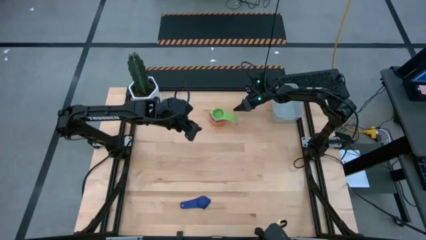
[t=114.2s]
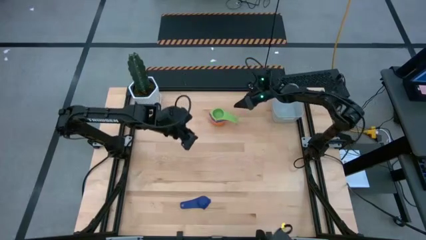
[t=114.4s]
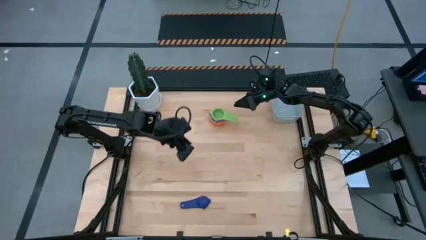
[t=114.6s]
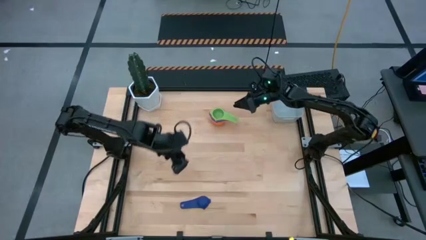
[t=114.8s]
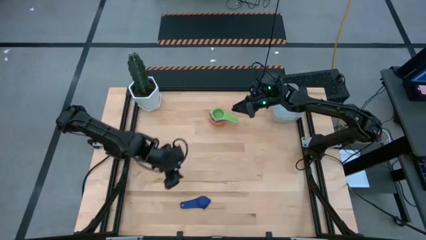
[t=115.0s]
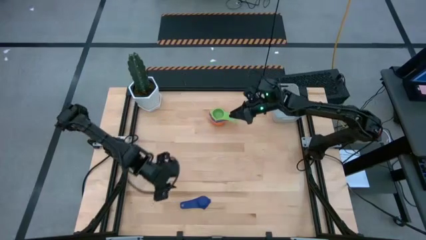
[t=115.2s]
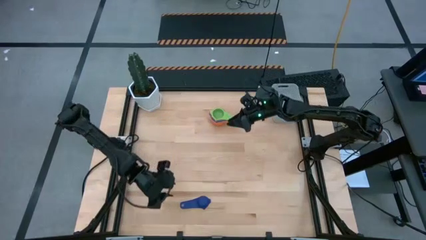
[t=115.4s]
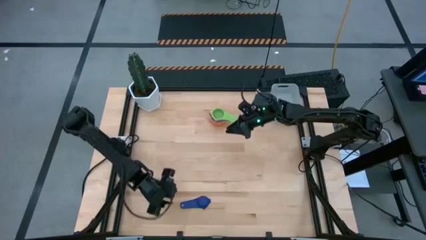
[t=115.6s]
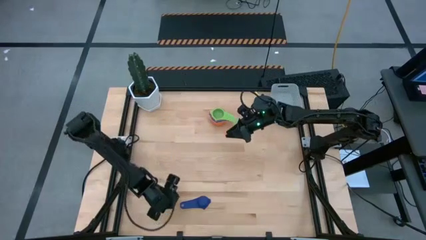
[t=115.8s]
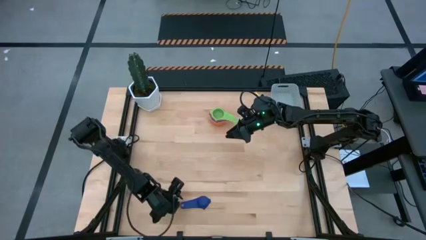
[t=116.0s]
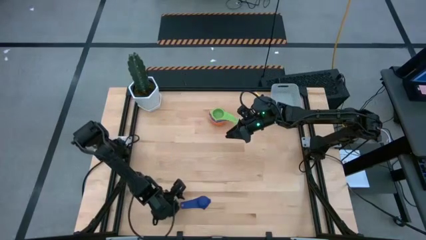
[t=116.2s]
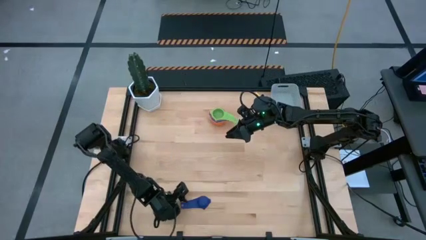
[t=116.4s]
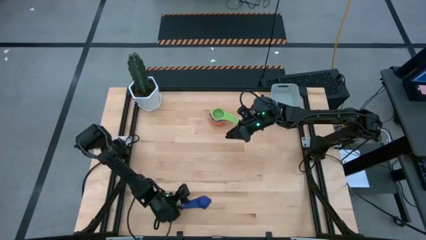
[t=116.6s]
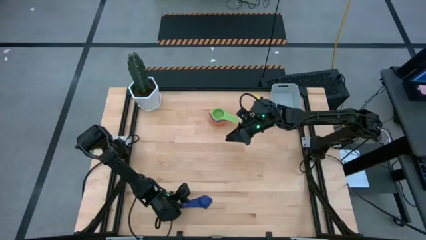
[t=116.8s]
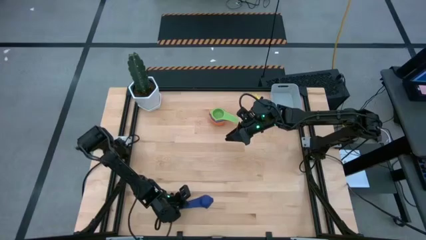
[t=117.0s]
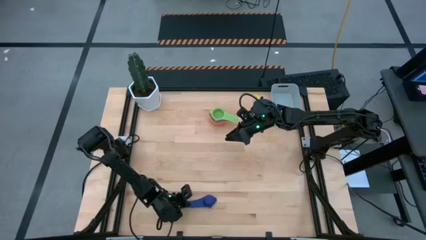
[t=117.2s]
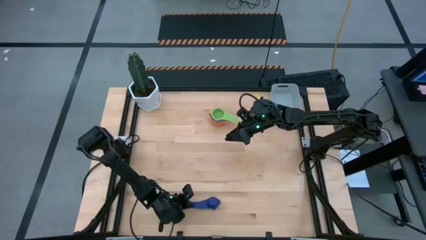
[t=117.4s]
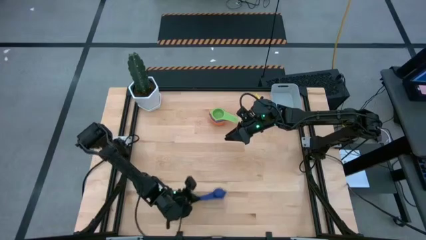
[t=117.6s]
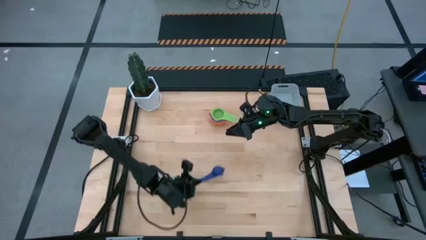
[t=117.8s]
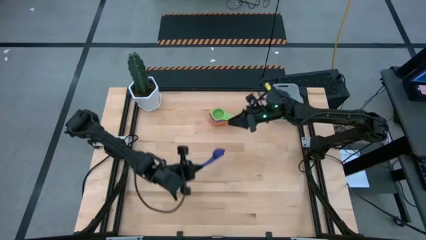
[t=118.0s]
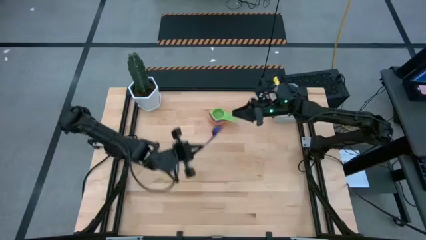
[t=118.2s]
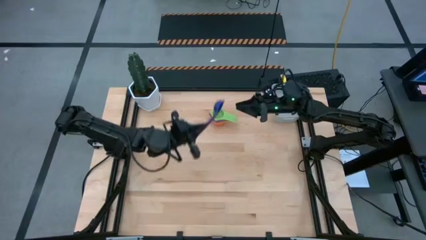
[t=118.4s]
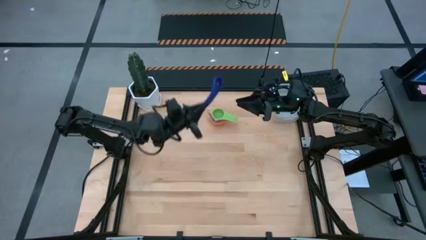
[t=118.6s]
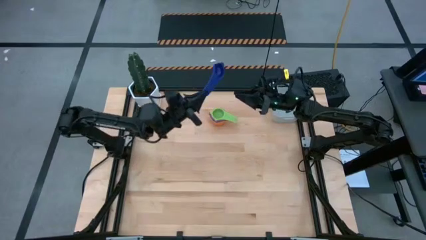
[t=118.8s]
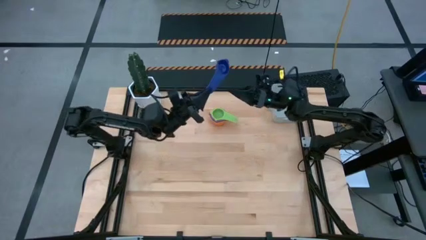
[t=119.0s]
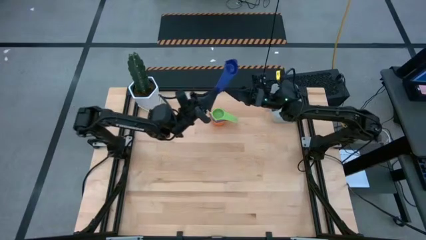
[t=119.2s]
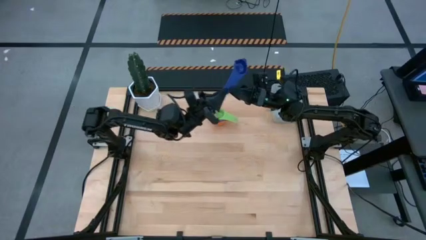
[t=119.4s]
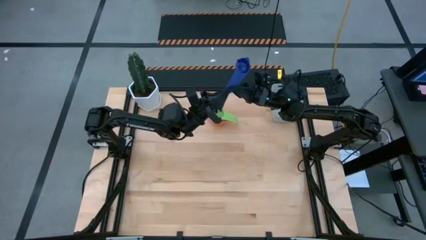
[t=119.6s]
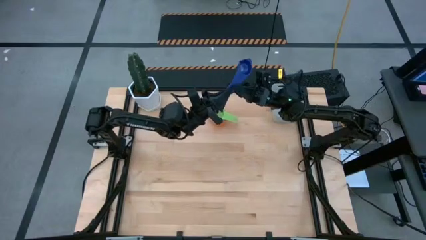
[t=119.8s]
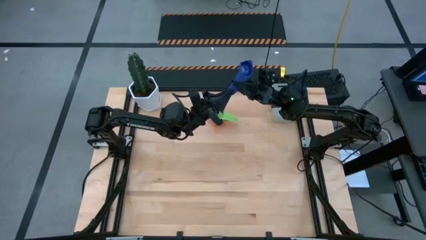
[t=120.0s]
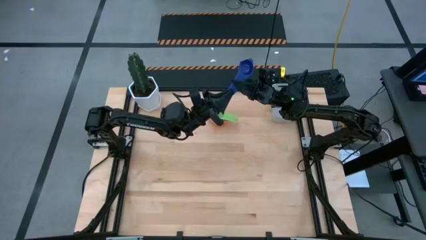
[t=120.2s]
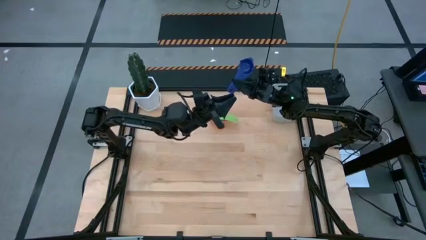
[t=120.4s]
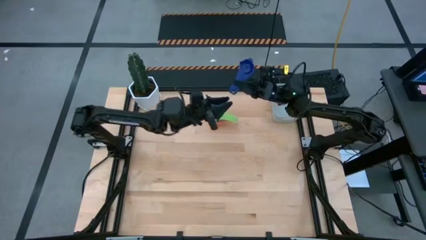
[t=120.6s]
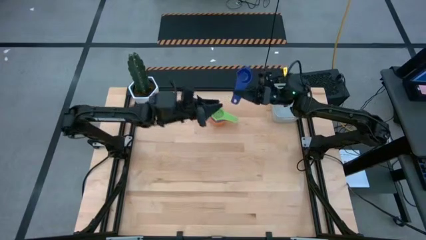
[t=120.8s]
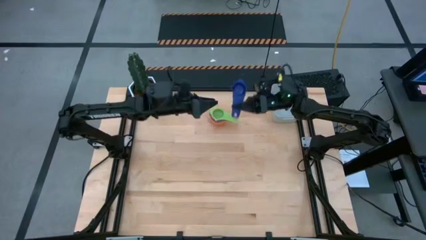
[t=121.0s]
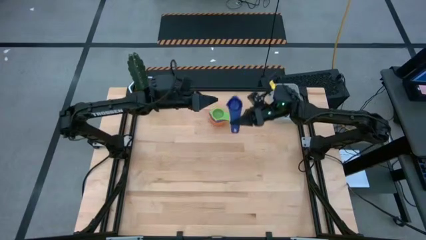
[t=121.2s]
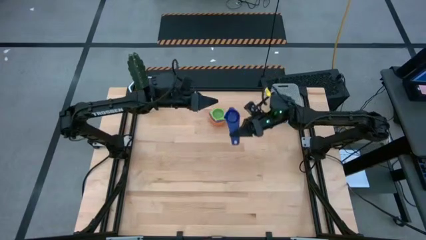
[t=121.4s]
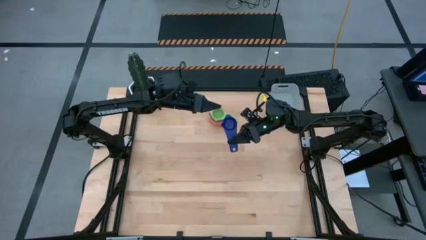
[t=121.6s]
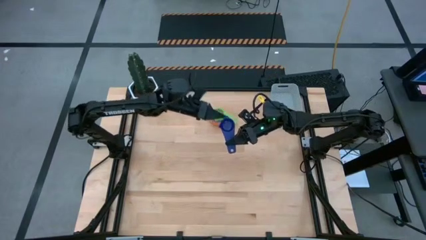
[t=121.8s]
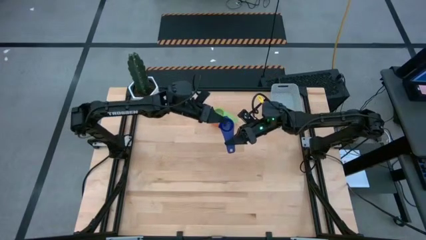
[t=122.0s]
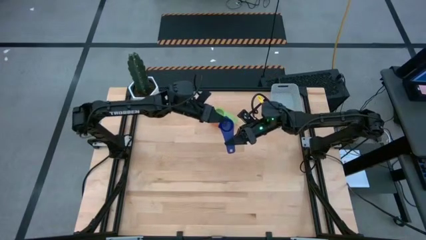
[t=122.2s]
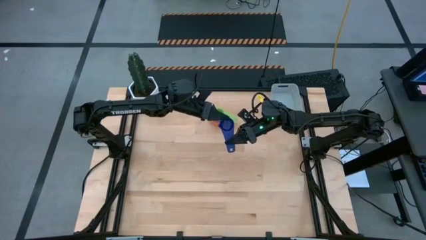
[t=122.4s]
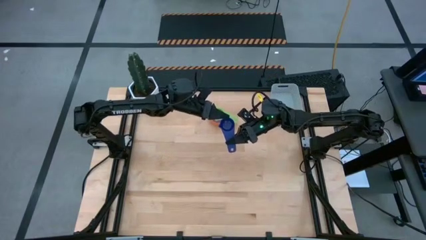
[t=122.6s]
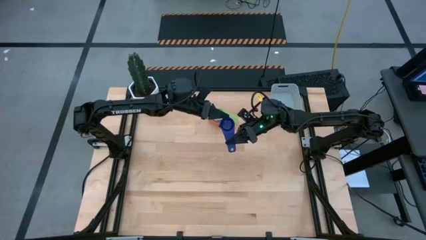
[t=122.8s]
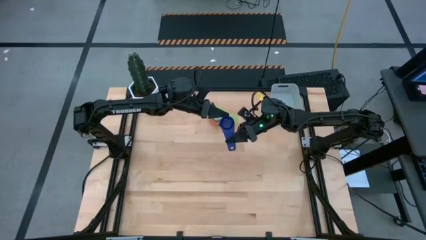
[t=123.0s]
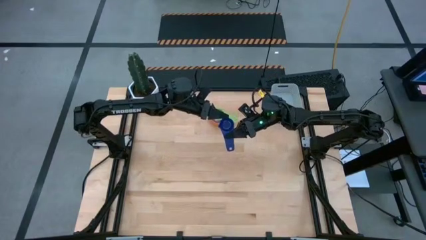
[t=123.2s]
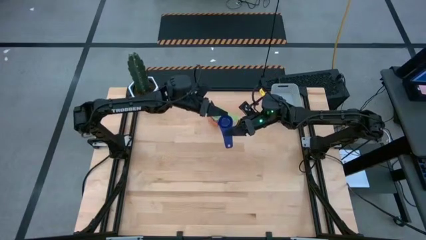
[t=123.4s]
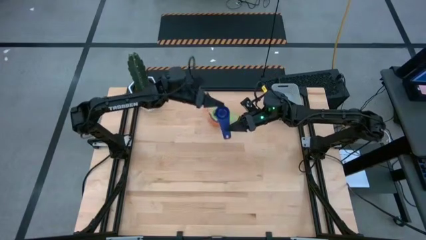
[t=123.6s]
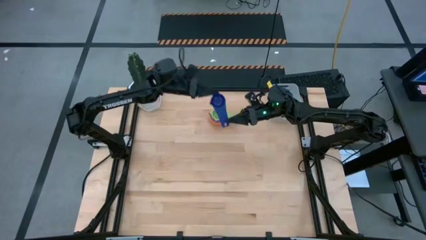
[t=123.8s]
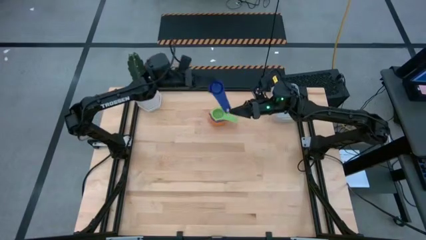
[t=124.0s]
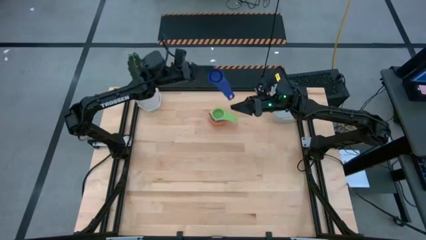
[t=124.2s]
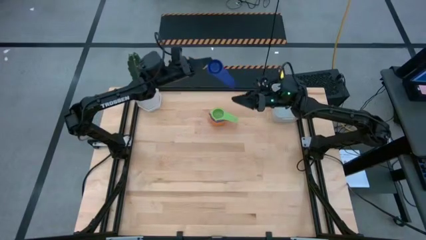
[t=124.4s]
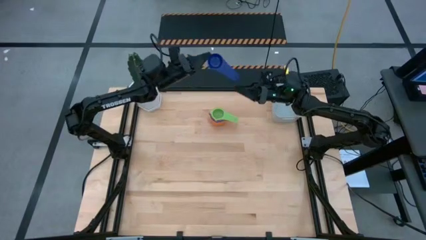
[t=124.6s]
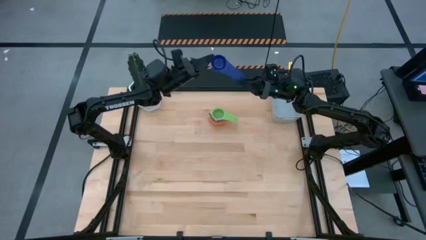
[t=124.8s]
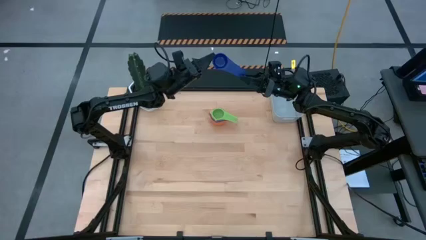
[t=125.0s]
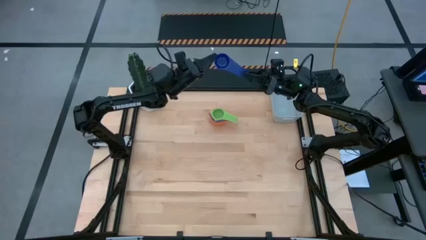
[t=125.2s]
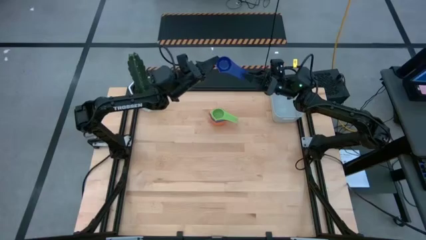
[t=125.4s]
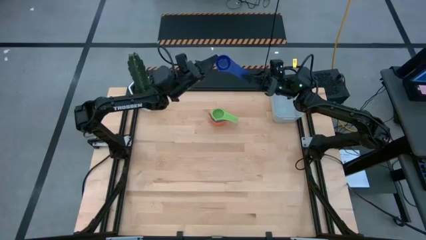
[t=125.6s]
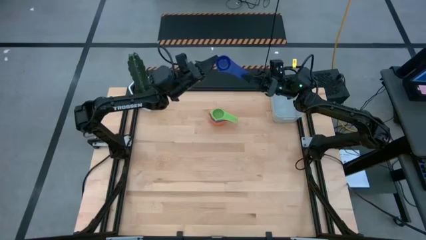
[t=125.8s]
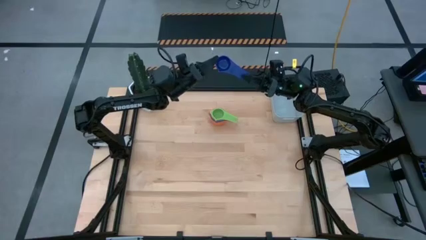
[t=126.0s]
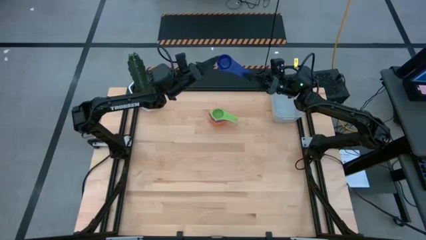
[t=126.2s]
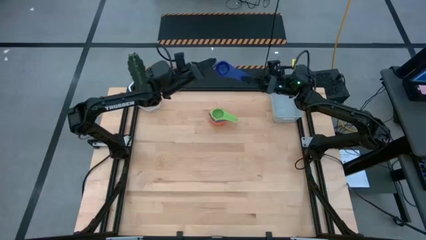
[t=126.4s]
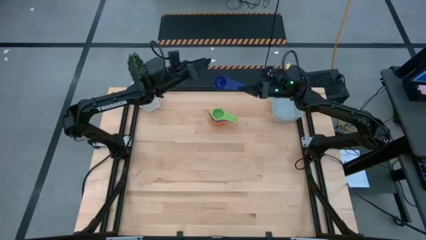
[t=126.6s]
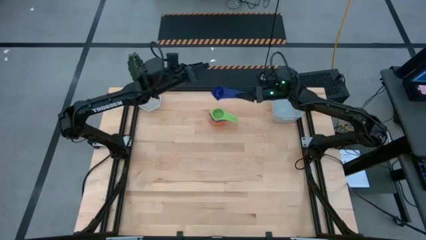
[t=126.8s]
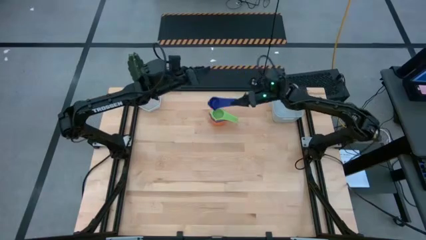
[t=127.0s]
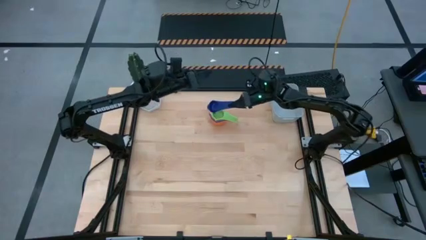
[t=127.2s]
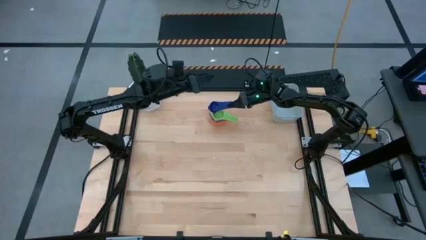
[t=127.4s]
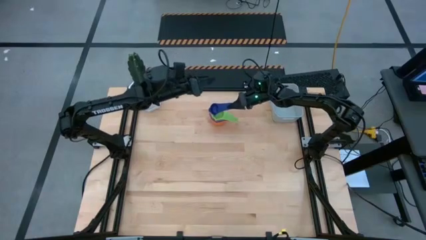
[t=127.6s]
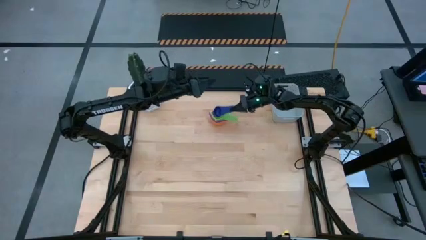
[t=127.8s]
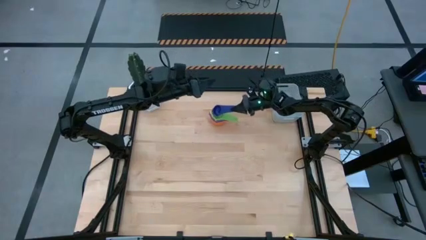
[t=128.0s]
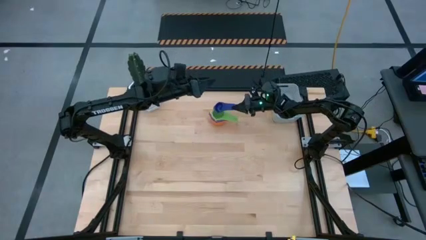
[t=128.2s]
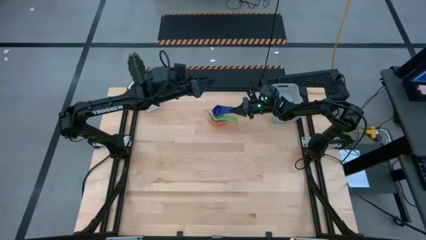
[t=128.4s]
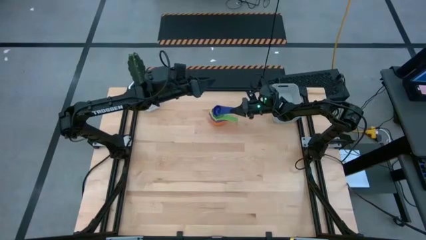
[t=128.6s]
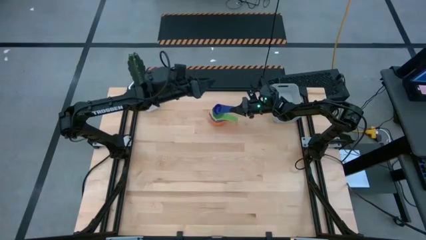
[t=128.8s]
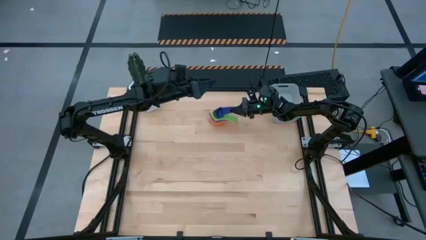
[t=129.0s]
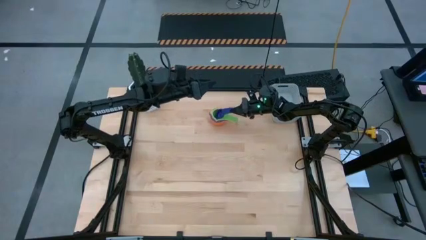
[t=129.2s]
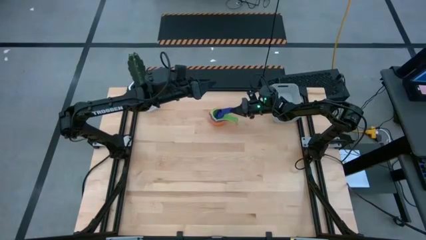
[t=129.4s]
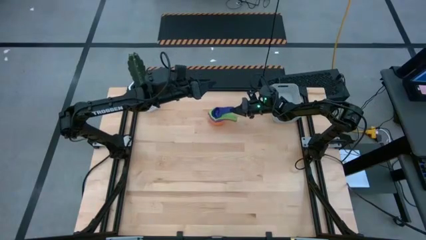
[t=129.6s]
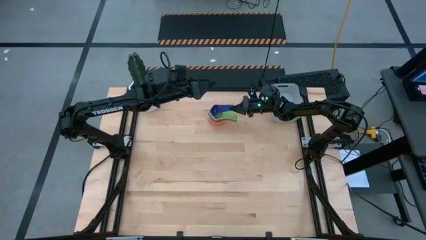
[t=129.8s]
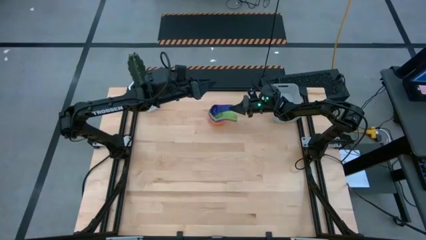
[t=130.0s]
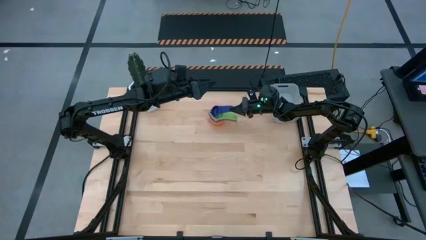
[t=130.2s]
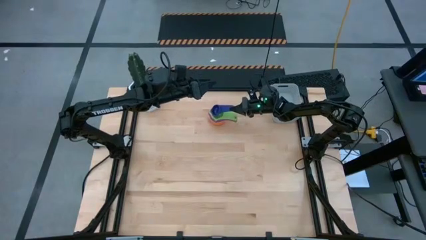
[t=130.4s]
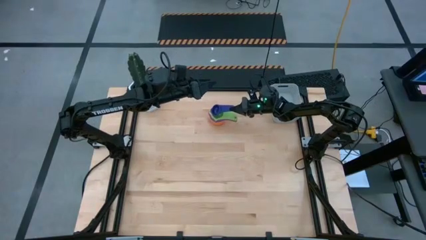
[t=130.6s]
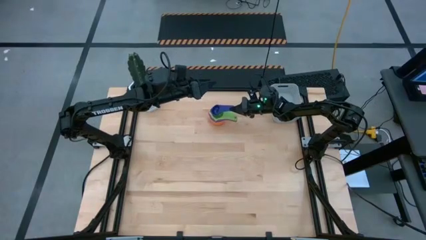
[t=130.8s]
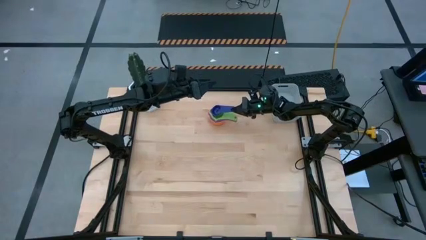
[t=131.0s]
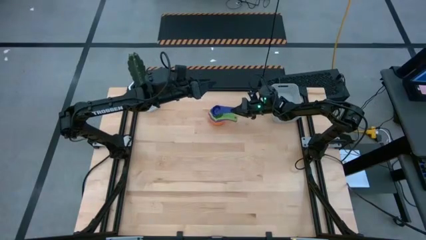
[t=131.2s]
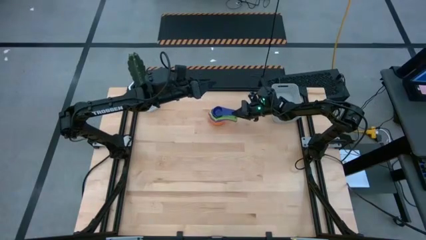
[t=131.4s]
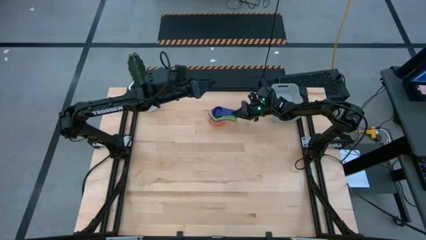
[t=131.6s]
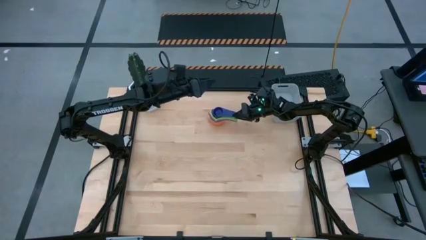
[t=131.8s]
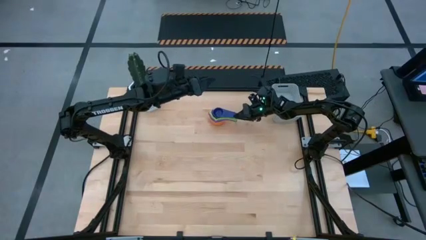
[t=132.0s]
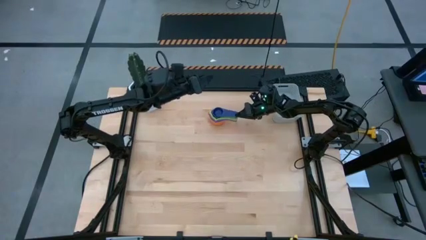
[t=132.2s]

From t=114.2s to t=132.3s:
Task: Nest measuring cups in basket
Stack the dark blue measuring cup on top of the green measuring cup
